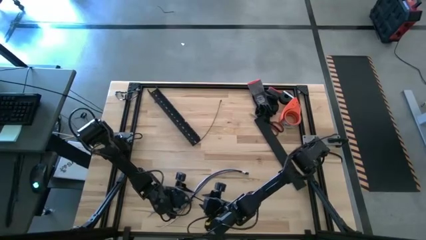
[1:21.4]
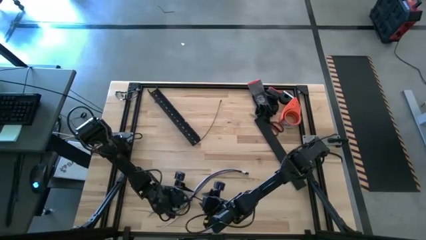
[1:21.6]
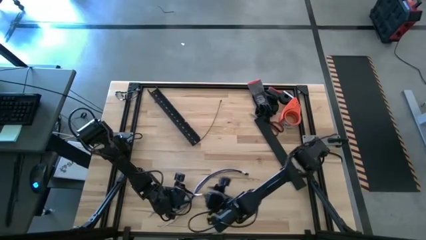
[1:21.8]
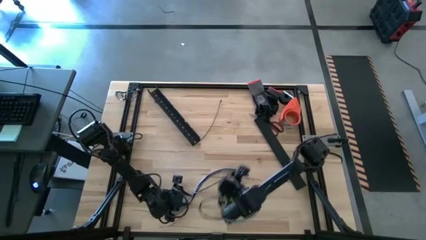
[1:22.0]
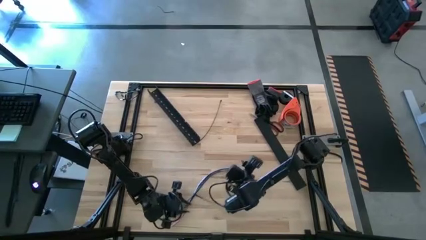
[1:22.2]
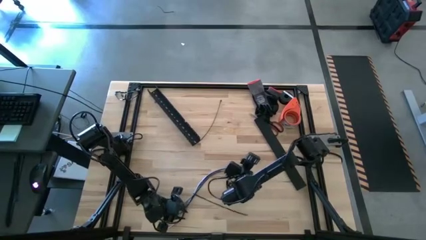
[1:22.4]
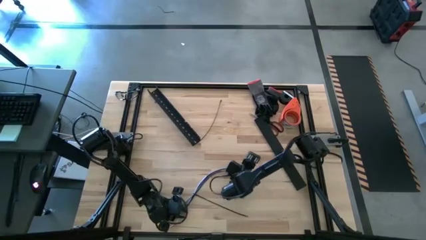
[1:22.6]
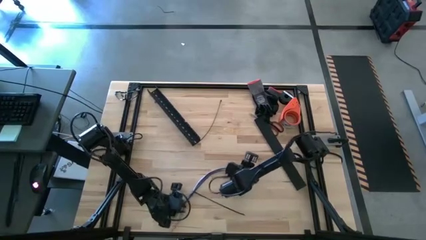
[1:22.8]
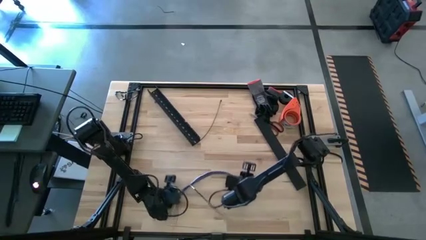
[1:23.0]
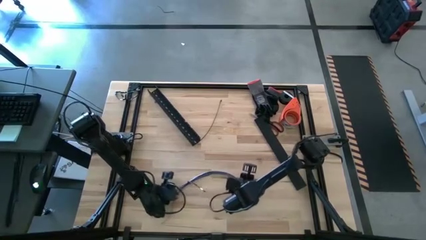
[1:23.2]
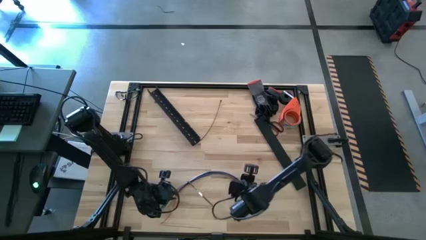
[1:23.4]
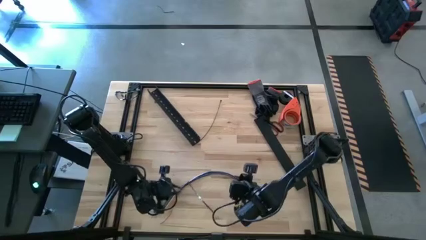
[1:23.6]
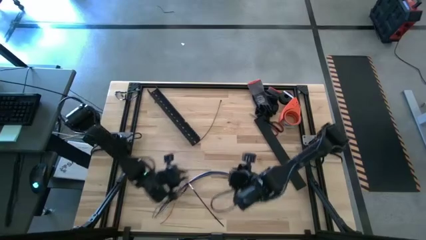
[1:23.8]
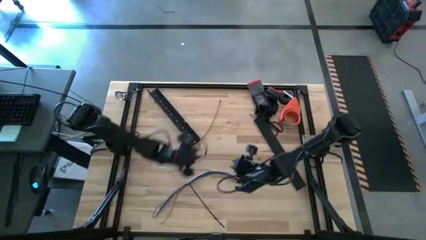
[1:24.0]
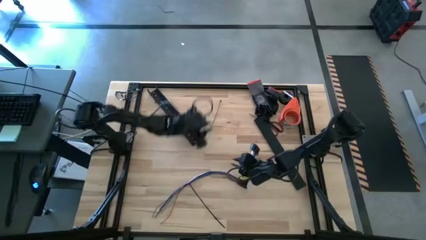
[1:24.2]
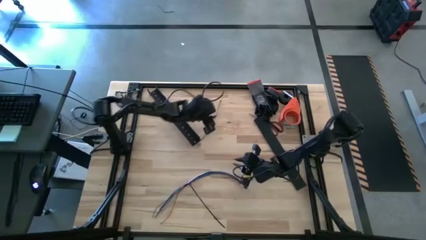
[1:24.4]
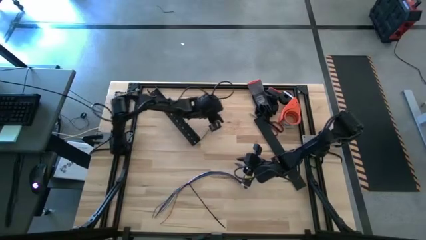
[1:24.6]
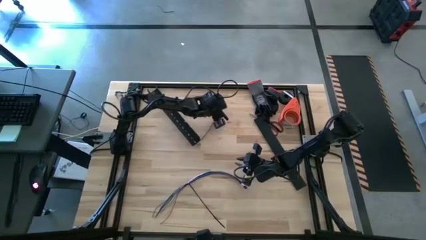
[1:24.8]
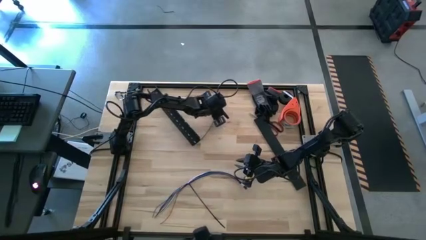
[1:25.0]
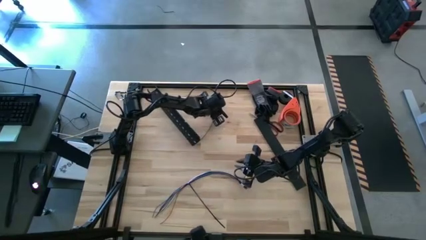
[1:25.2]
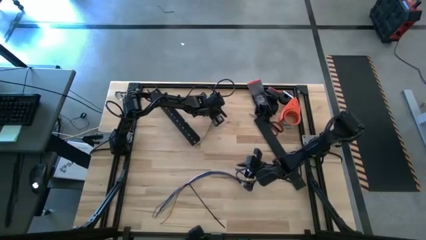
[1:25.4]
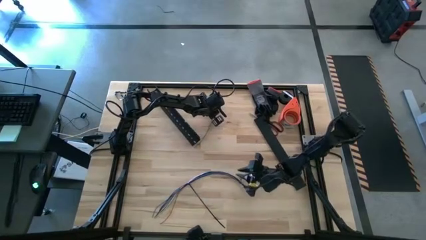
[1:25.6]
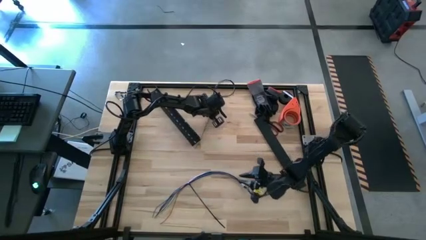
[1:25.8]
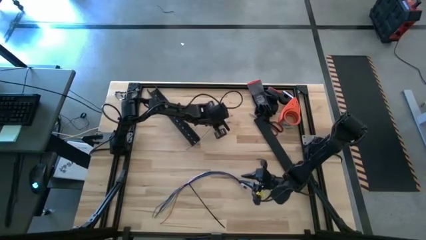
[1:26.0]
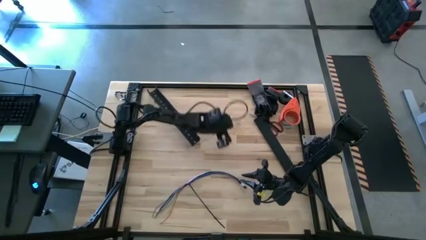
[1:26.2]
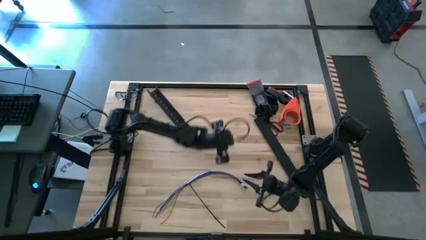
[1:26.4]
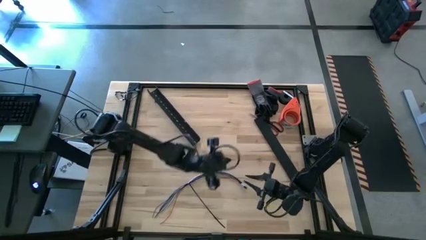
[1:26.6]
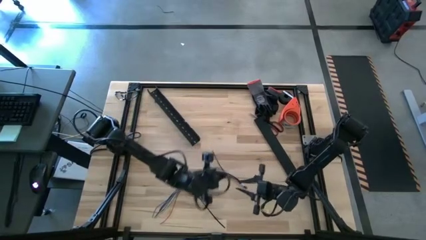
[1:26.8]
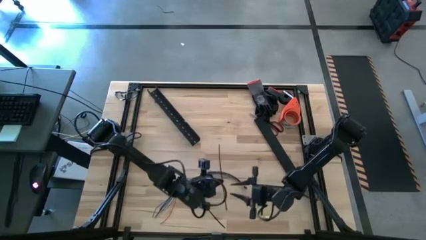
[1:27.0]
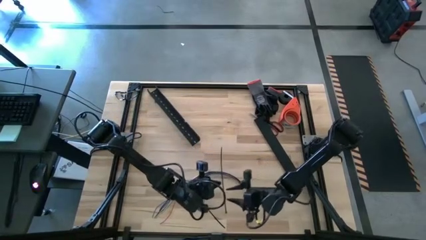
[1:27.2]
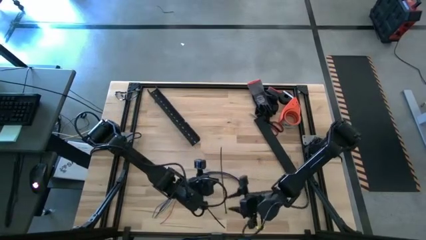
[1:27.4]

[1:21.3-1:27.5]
Task: Ziptie cables
Wrap the cable wires with the black zip tie

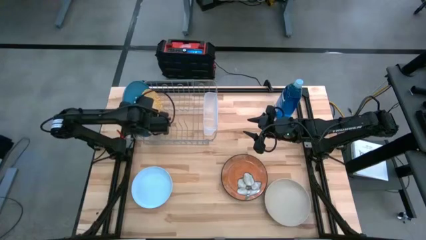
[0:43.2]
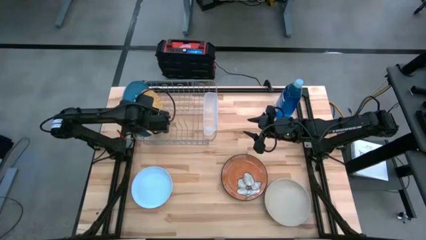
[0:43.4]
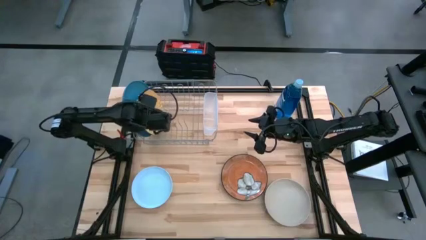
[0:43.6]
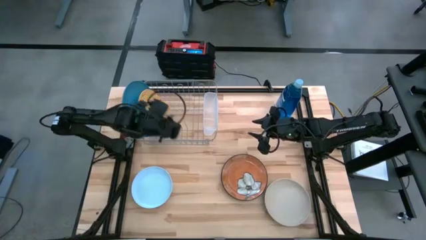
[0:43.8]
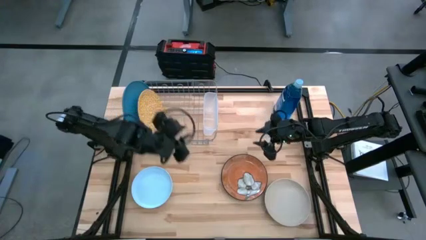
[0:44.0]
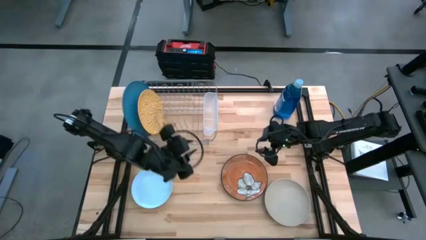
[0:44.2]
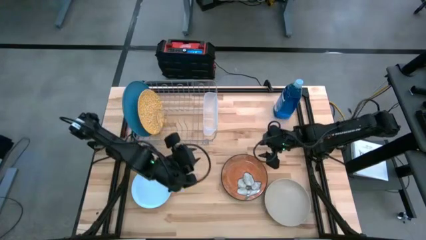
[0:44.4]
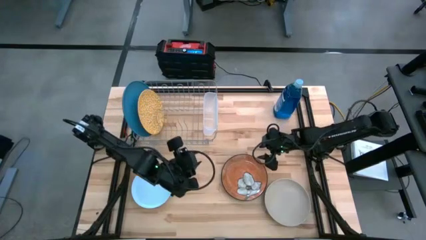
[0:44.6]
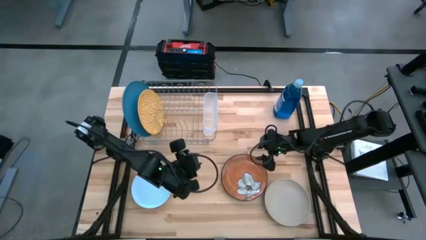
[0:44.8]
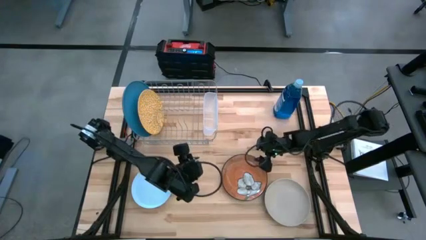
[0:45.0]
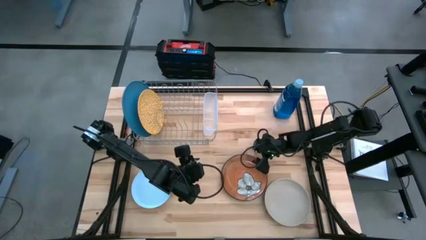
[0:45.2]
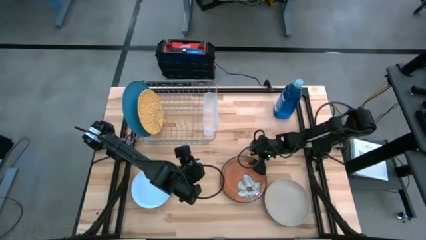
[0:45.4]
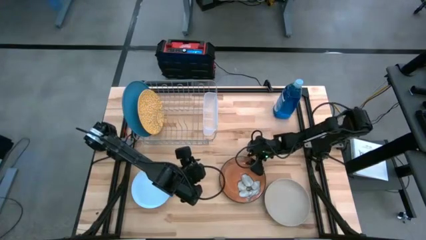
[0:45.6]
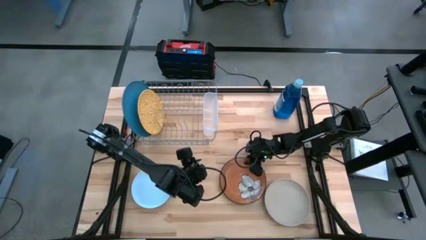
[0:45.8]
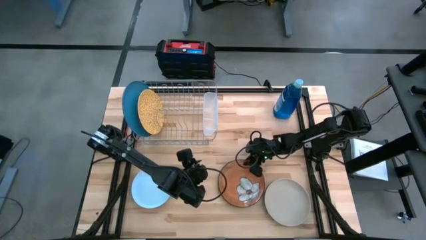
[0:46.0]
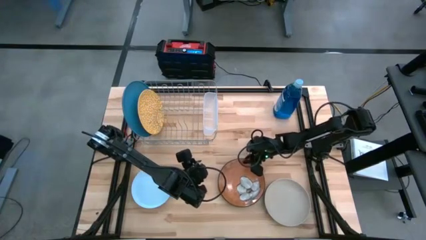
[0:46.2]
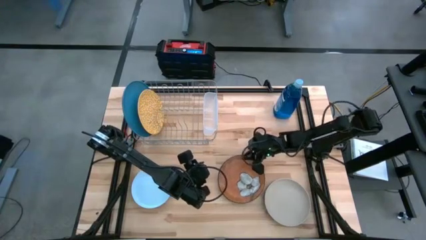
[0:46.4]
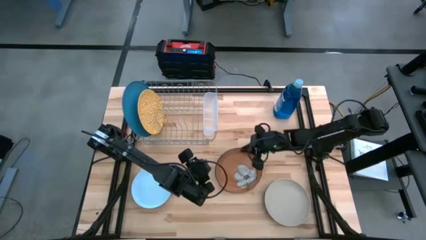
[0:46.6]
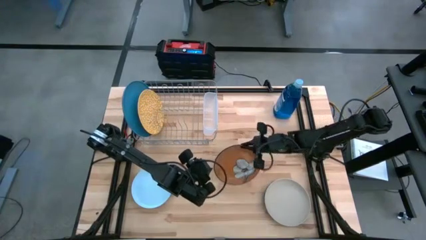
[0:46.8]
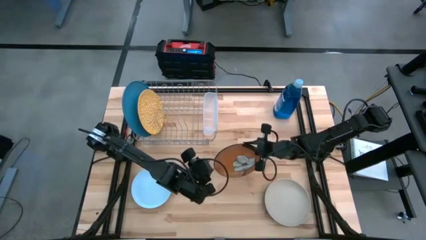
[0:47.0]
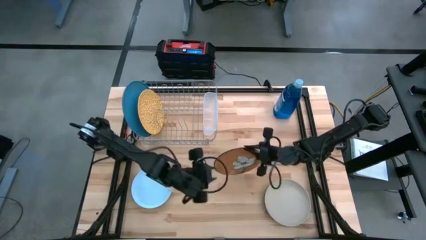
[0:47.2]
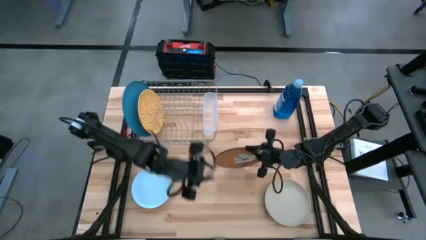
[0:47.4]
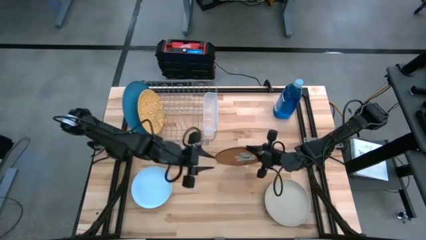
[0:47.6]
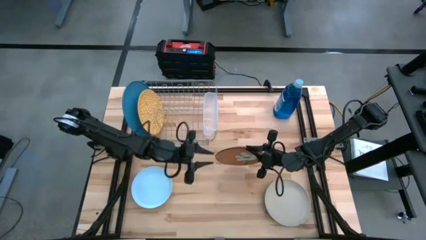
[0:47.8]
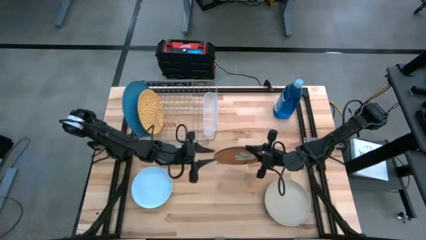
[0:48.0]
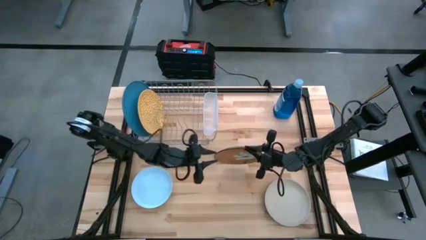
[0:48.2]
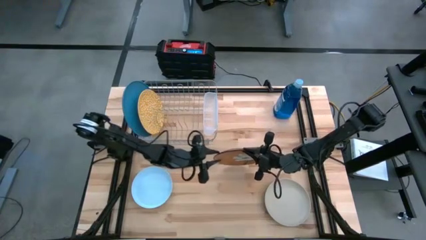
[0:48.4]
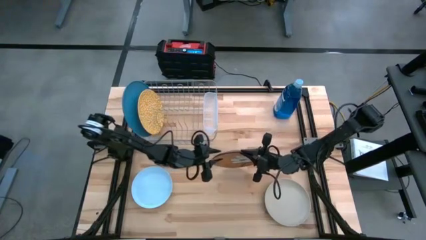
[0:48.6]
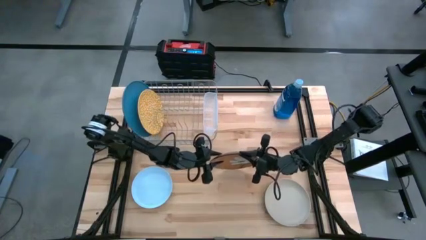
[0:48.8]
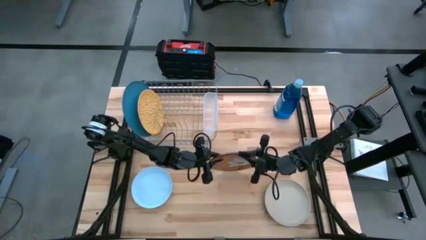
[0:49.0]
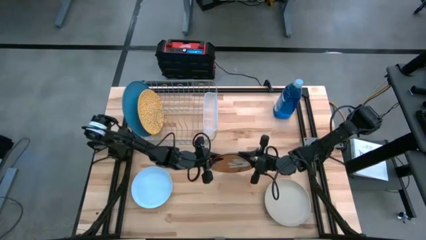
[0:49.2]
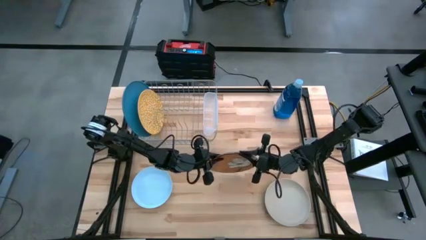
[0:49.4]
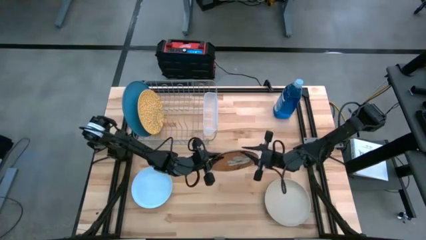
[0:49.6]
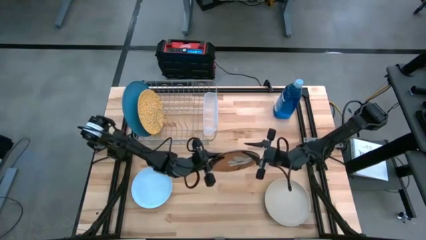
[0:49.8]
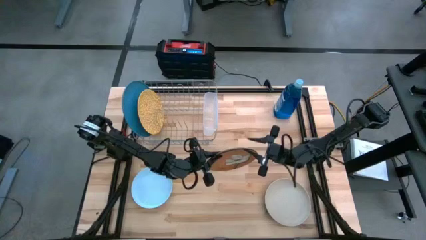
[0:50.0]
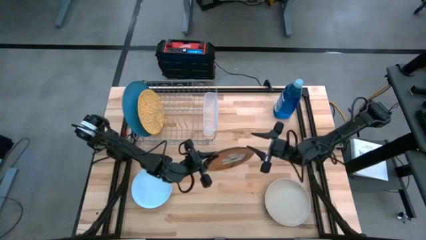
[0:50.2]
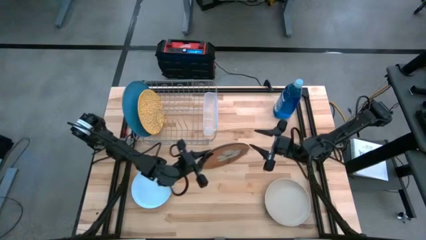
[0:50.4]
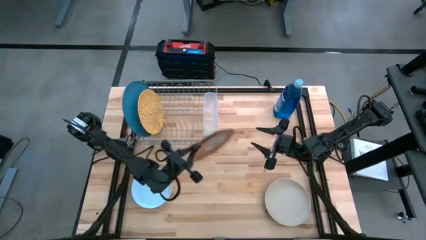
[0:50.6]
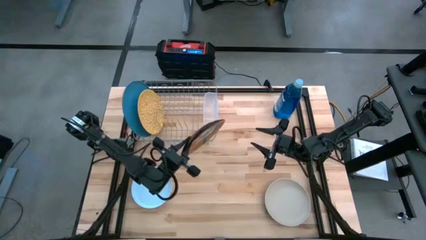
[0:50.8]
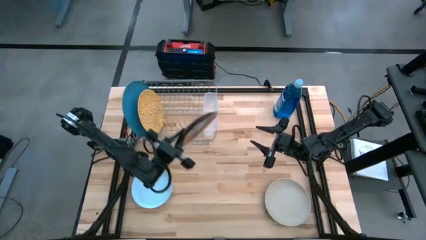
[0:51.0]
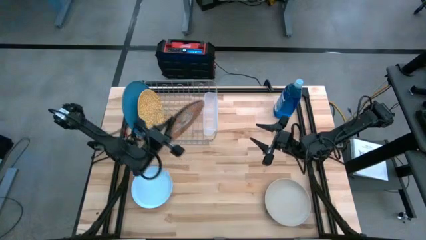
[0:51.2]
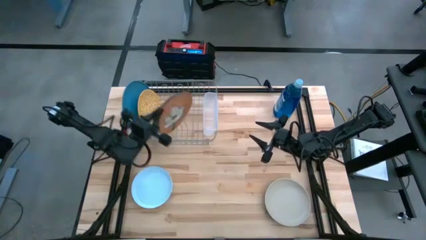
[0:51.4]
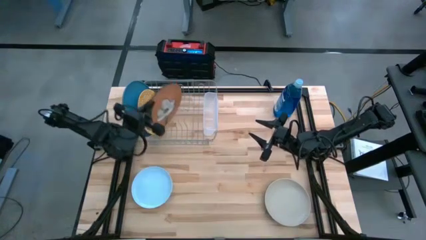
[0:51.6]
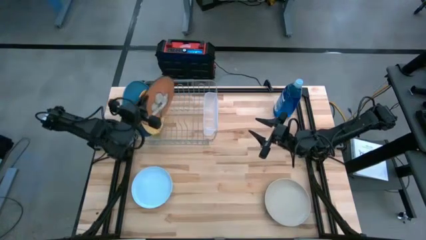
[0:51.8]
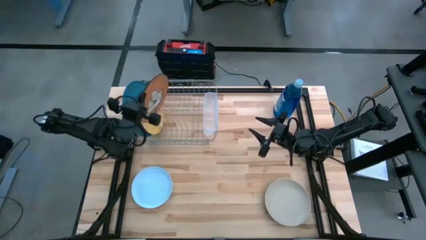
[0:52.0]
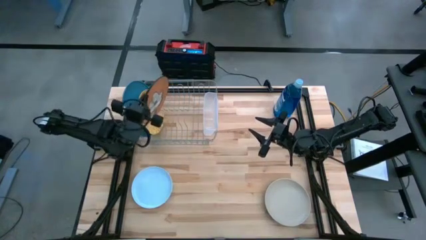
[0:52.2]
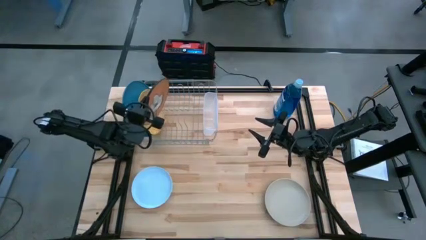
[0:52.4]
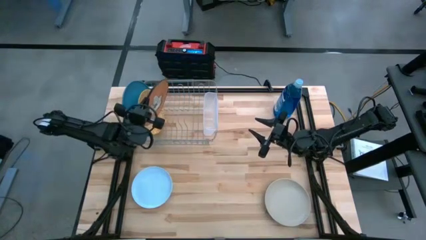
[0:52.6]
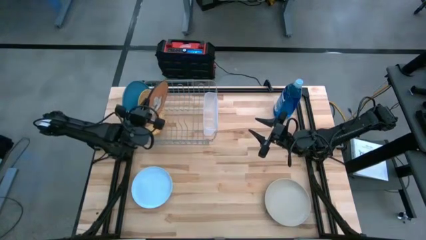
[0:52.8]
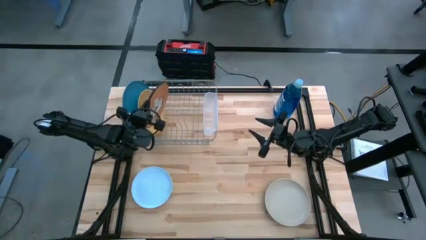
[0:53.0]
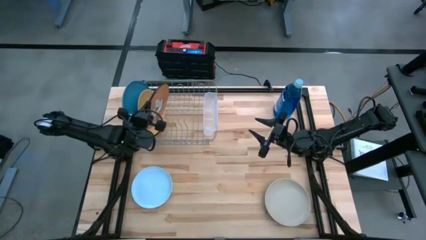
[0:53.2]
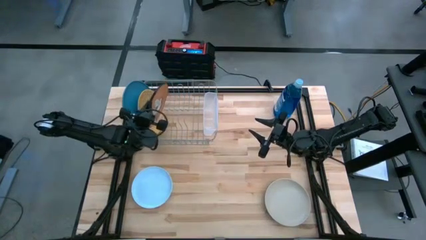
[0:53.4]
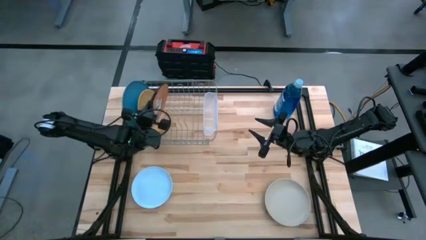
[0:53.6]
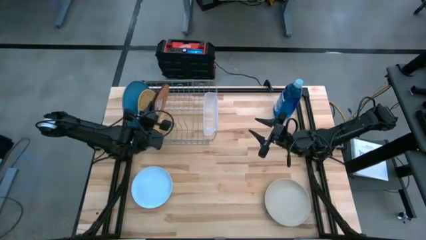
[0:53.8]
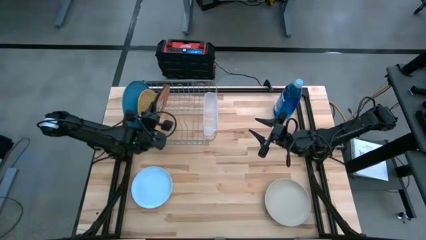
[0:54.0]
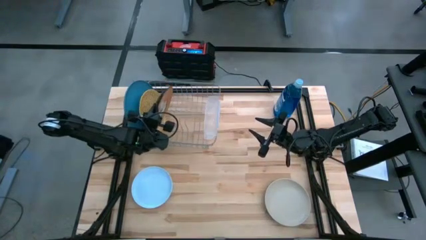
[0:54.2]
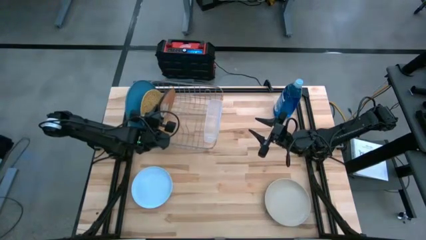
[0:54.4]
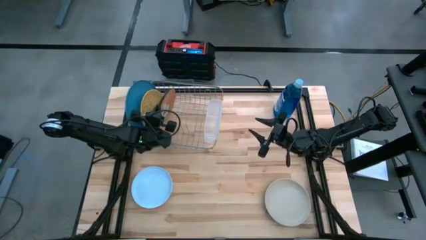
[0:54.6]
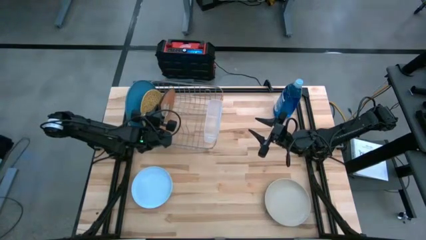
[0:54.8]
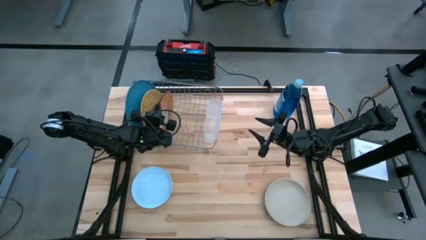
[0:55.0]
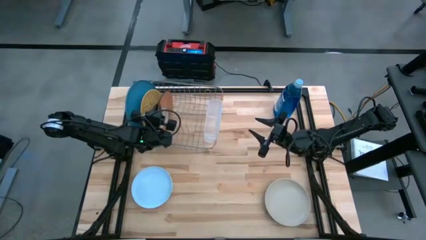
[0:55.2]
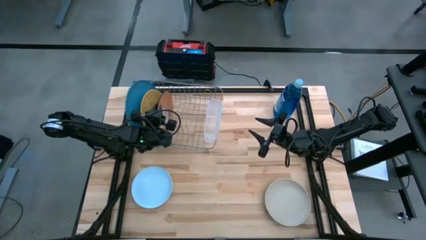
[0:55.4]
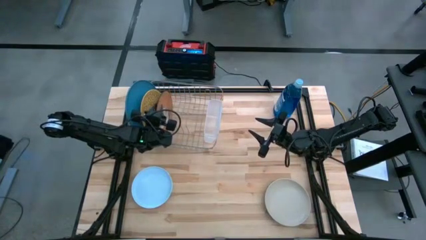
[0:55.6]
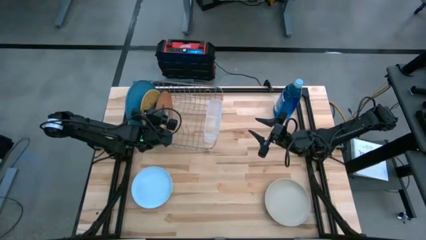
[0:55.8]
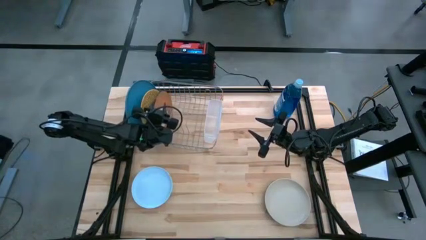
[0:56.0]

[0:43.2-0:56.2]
Task: Sort dishes
Put the orange plate in the dish rack
